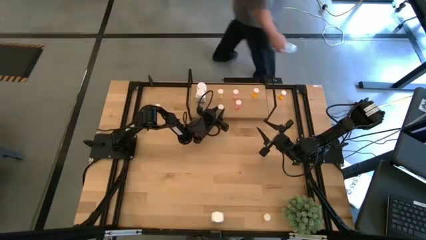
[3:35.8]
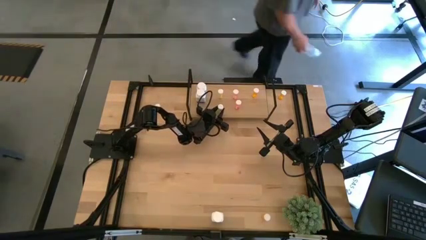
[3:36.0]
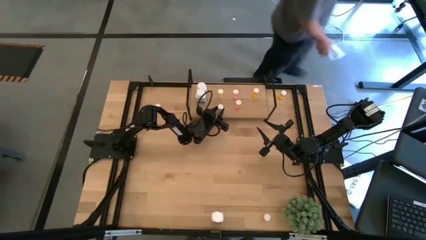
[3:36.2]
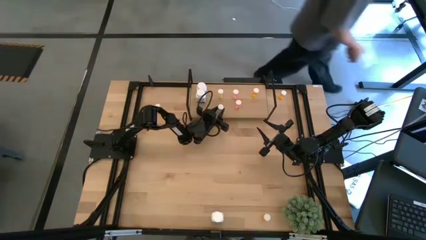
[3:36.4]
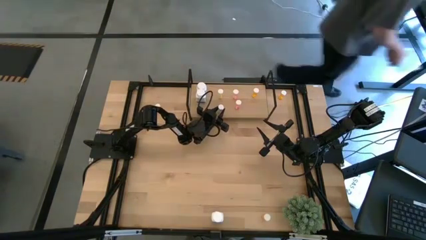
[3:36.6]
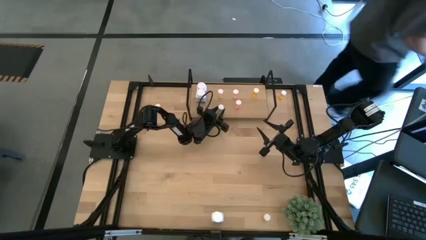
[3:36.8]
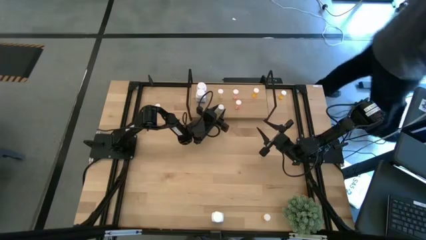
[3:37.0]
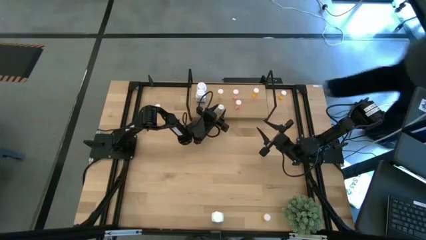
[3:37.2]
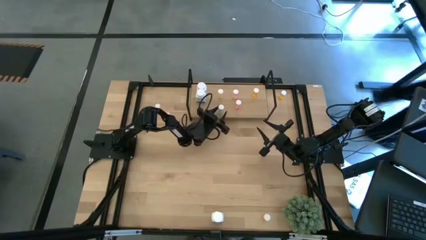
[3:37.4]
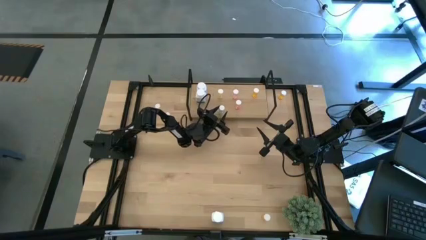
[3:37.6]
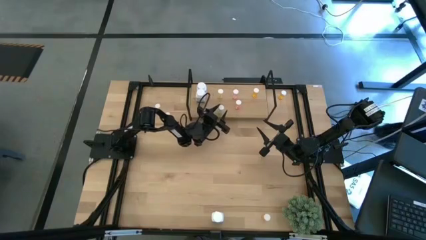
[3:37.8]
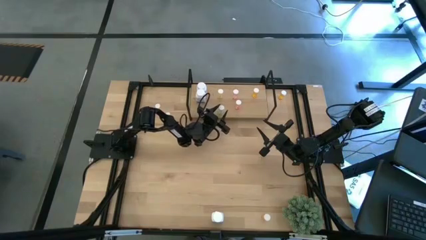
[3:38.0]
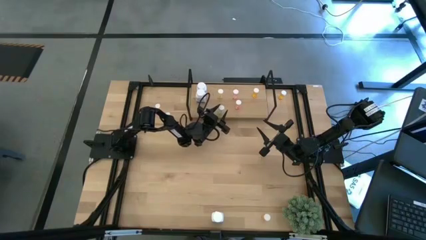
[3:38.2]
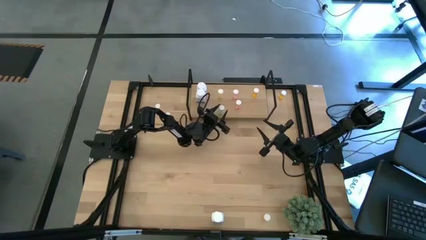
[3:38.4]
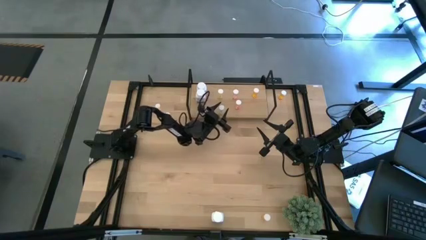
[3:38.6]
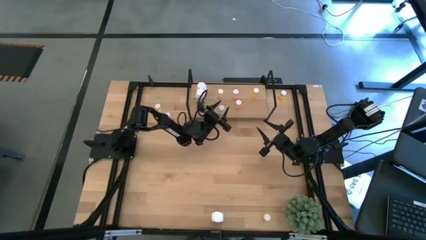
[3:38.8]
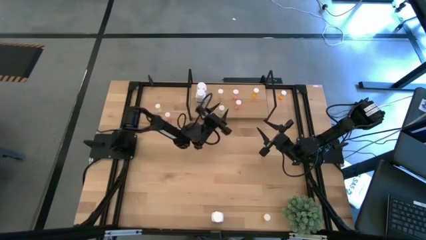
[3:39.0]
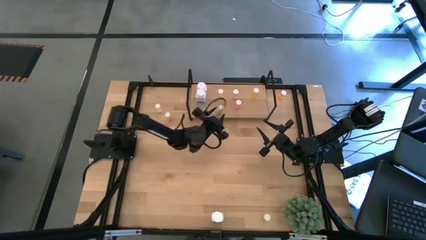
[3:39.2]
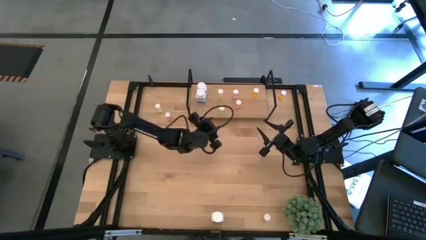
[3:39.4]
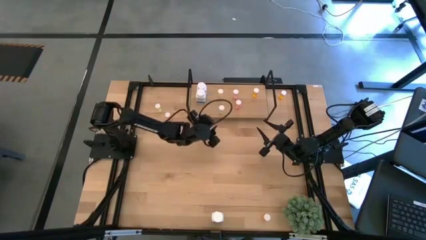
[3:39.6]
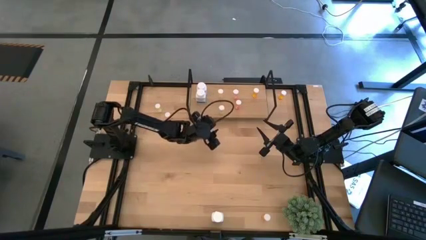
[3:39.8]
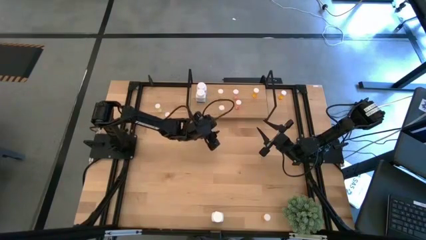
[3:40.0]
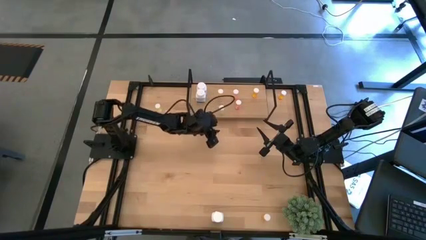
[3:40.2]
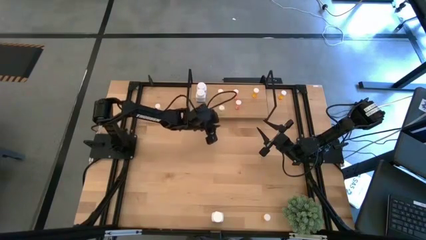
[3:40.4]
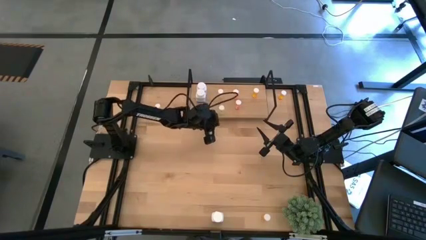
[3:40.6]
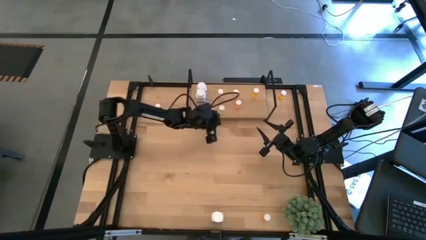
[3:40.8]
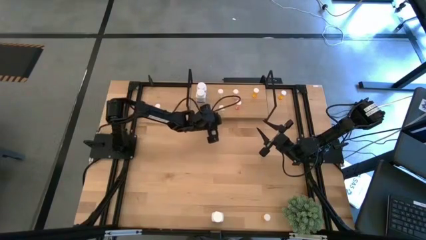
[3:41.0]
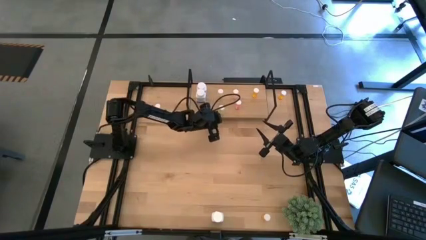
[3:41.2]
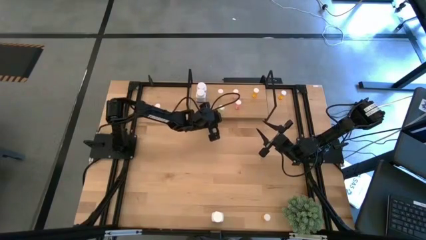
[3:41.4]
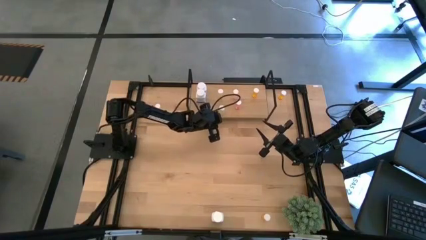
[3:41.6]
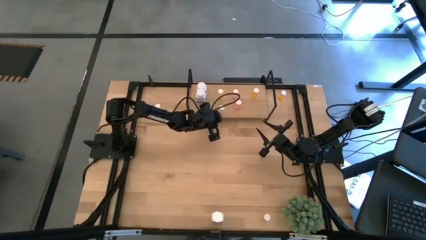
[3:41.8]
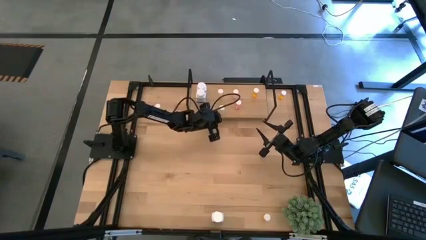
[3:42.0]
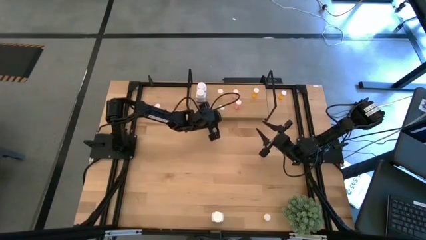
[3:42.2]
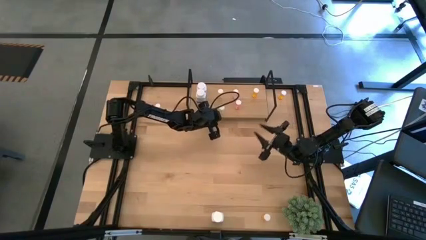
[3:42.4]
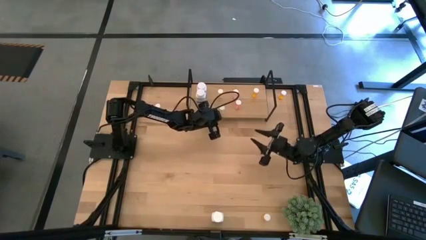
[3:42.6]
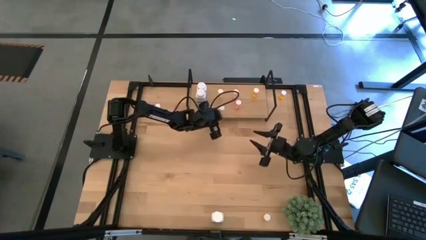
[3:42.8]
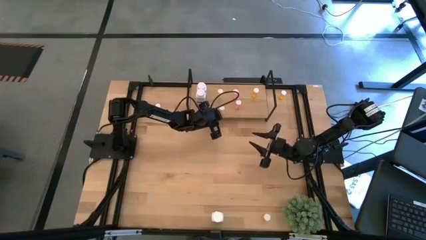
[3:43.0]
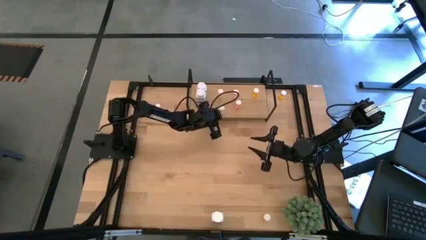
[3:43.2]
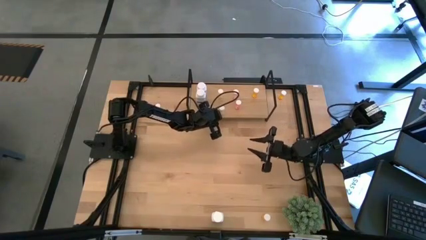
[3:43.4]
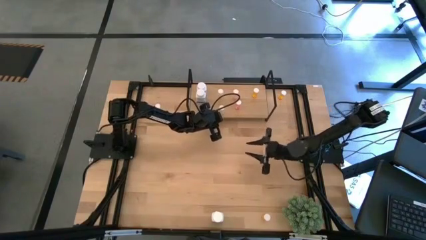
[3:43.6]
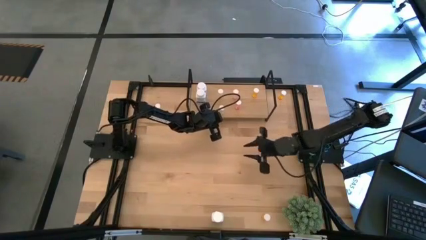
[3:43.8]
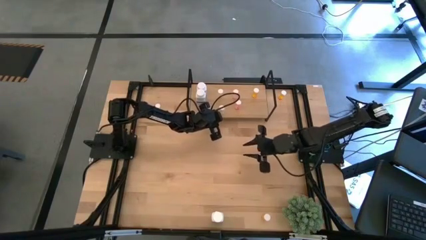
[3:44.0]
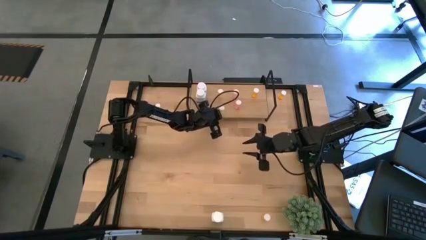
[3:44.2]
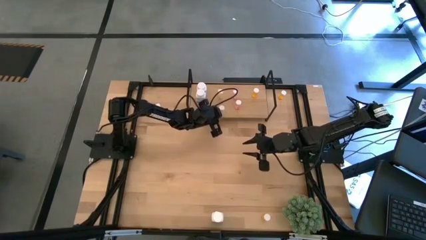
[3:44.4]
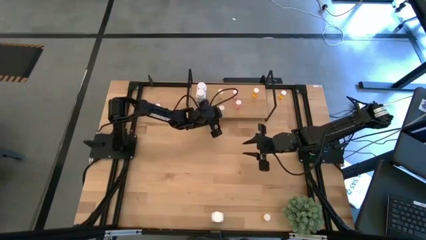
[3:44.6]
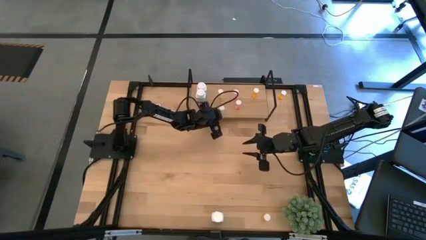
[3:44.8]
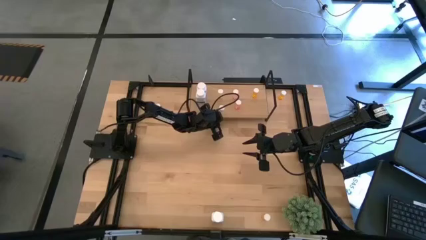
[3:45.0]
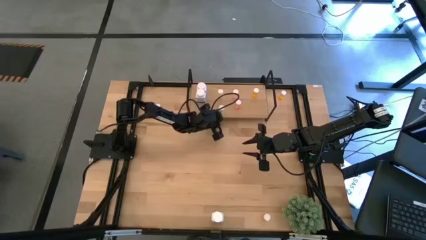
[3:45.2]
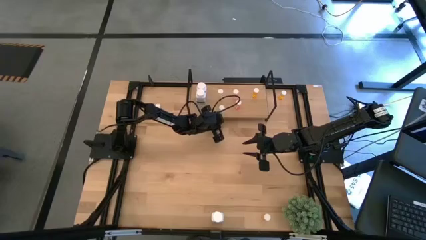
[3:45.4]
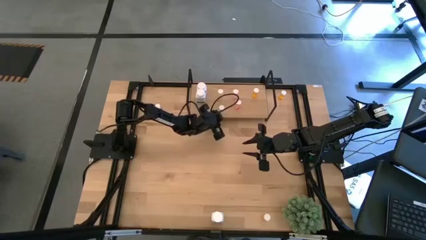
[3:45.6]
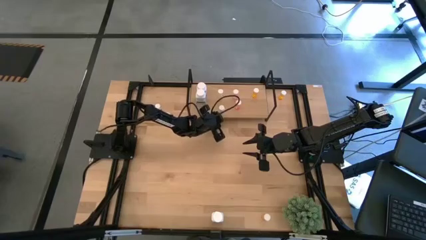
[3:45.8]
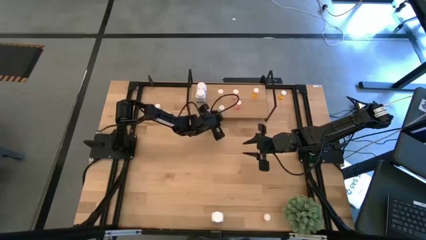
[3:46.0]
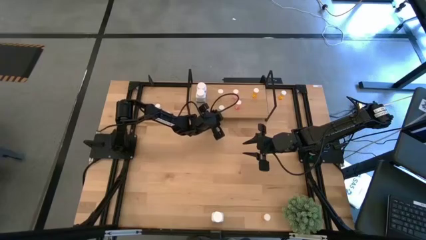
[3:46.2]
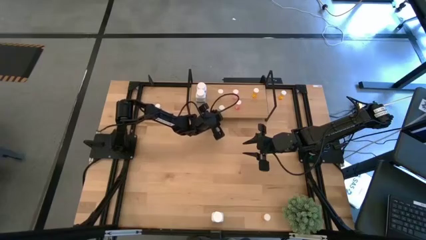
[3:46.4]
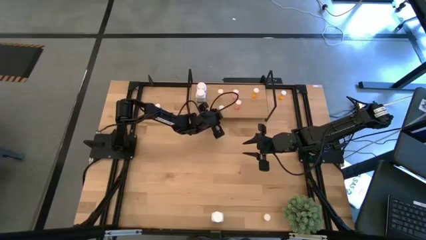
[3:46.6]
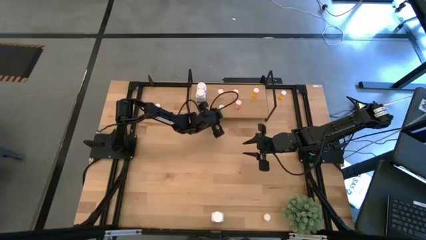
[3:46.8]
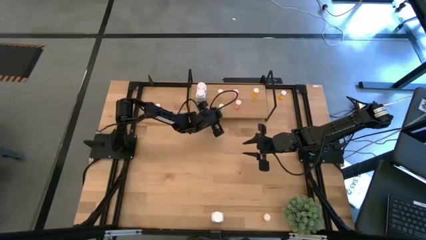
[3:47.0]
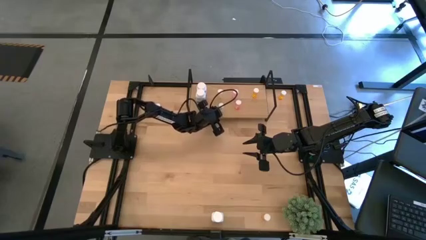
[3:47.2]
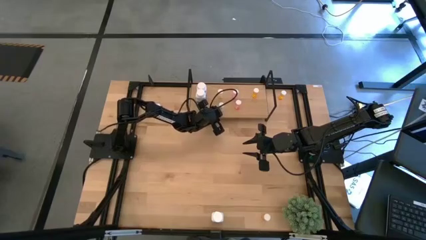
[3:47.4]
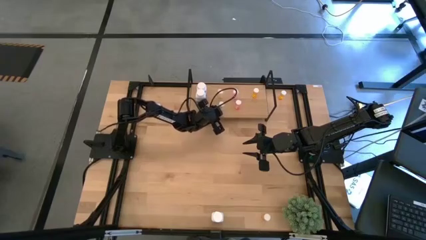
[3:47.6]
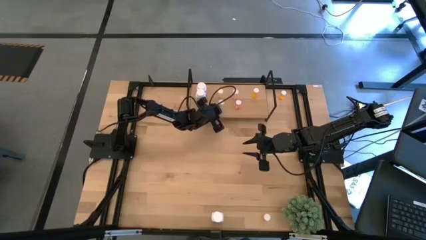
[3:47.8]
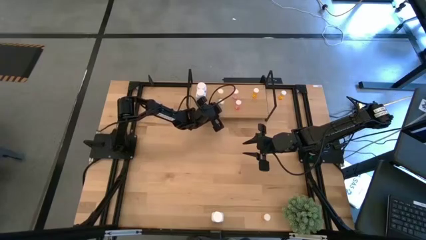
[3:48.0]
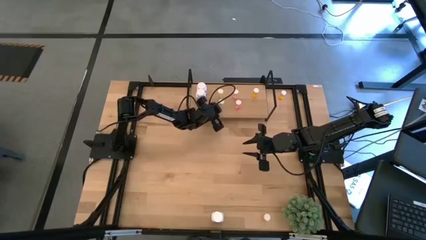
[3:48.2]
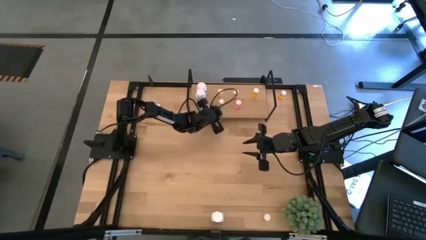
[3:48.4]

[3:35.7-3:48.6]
Task: Pick and place medicine bottles onto shelf by color
Put the bottom yellow pill bottle on the shelf aligned with the other yellow pill bottle
